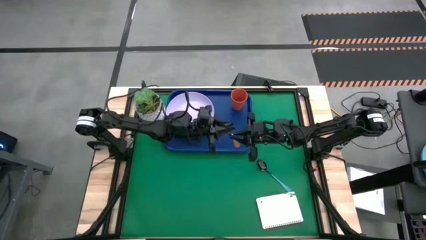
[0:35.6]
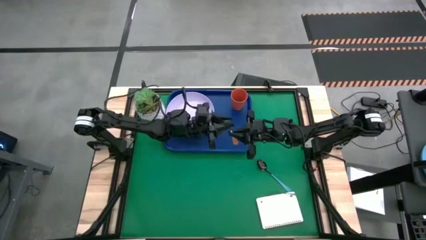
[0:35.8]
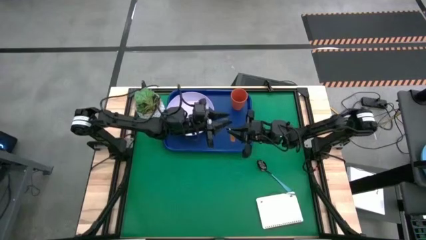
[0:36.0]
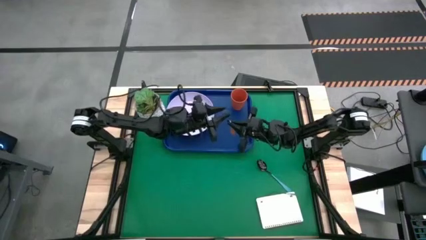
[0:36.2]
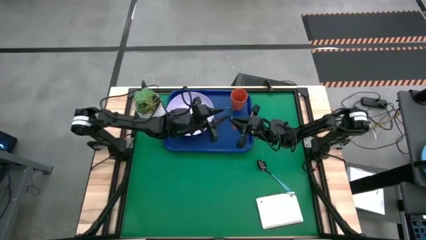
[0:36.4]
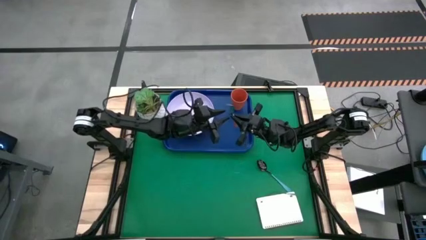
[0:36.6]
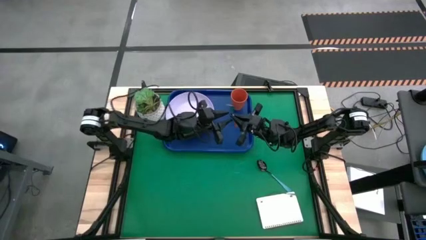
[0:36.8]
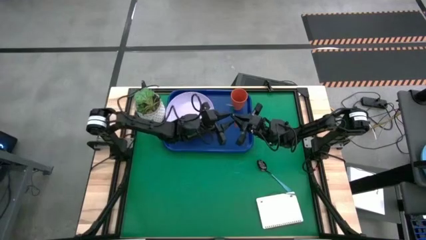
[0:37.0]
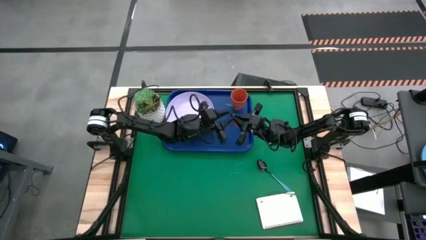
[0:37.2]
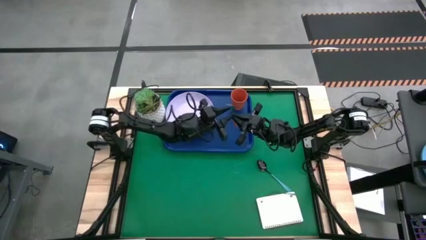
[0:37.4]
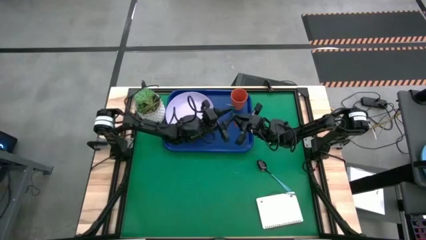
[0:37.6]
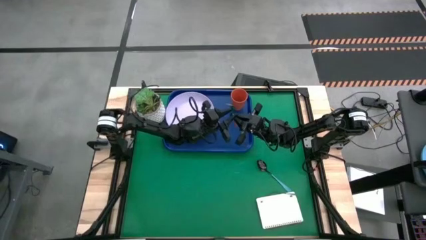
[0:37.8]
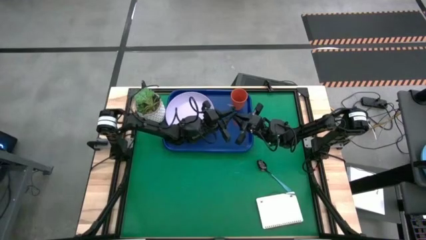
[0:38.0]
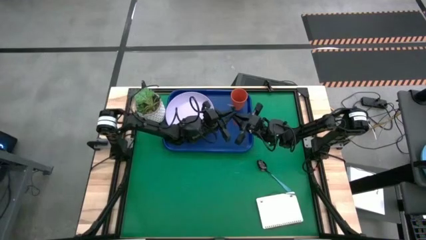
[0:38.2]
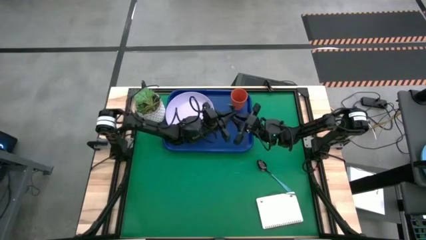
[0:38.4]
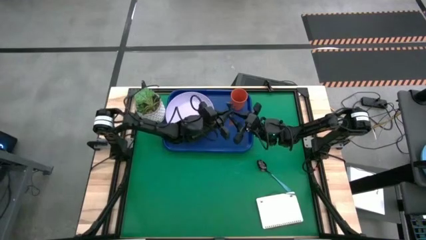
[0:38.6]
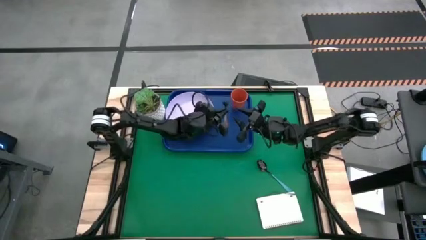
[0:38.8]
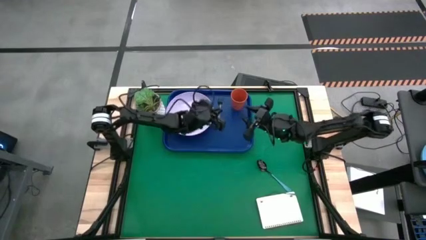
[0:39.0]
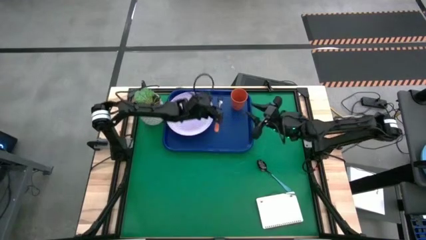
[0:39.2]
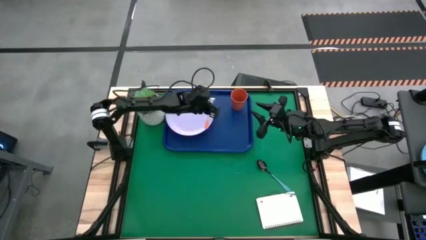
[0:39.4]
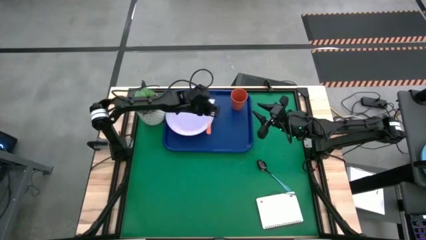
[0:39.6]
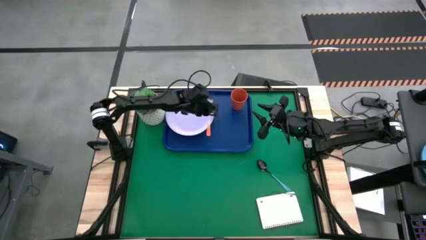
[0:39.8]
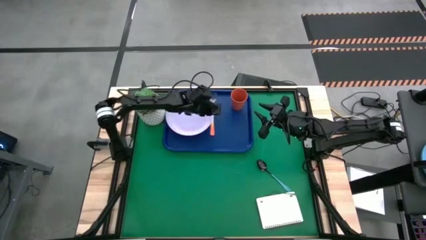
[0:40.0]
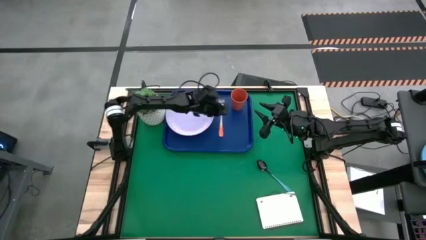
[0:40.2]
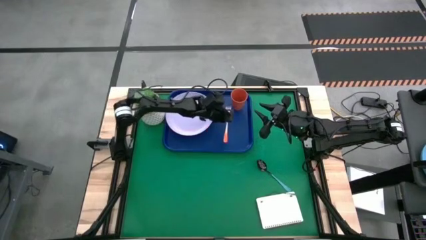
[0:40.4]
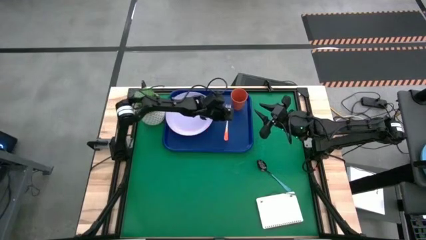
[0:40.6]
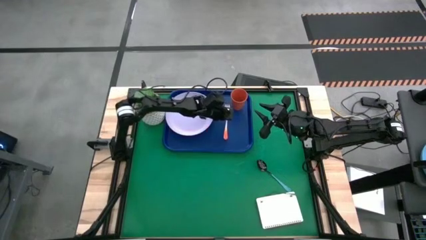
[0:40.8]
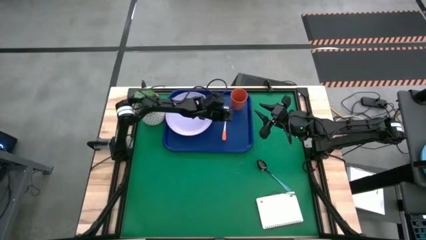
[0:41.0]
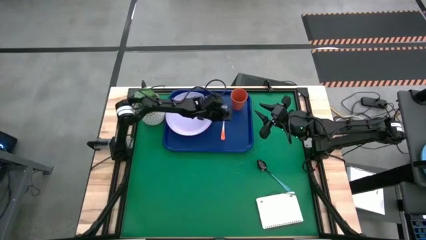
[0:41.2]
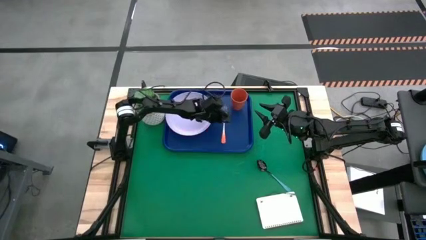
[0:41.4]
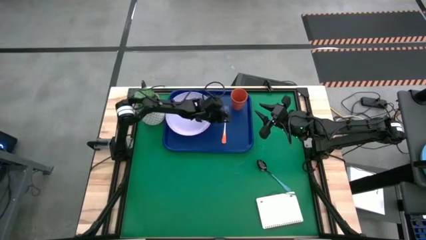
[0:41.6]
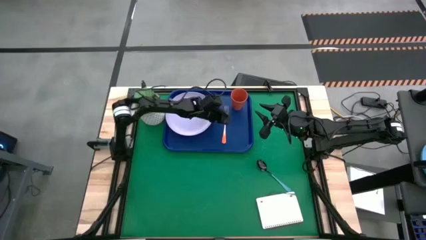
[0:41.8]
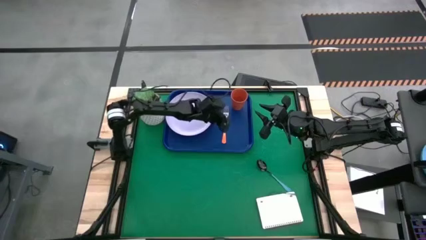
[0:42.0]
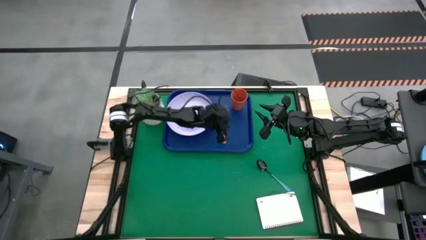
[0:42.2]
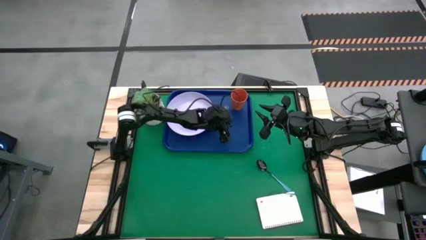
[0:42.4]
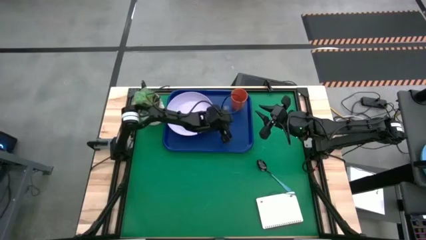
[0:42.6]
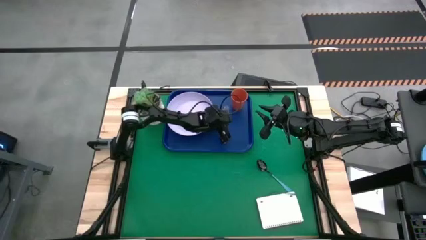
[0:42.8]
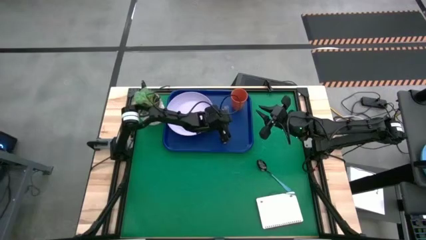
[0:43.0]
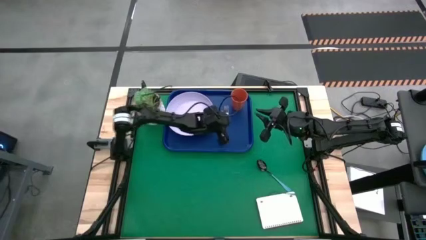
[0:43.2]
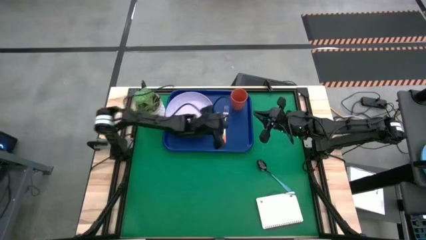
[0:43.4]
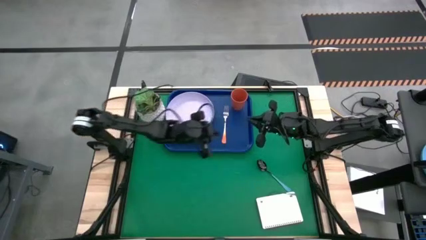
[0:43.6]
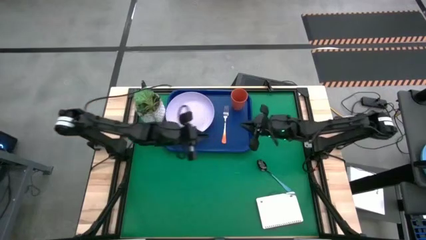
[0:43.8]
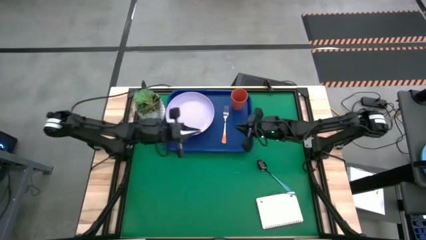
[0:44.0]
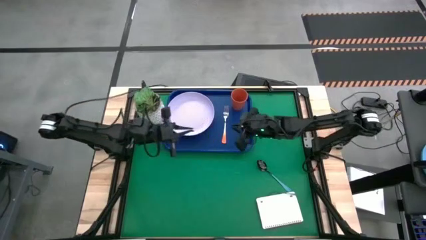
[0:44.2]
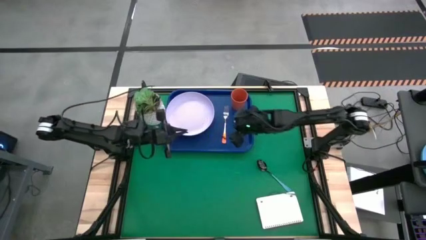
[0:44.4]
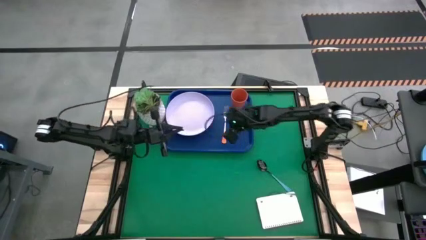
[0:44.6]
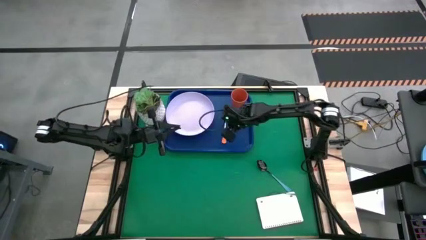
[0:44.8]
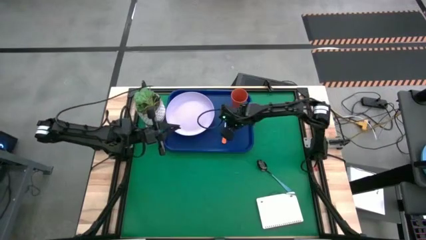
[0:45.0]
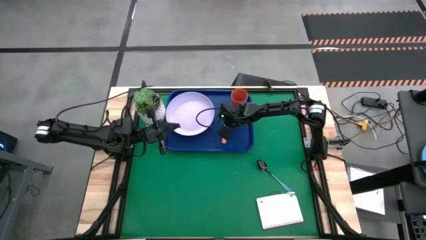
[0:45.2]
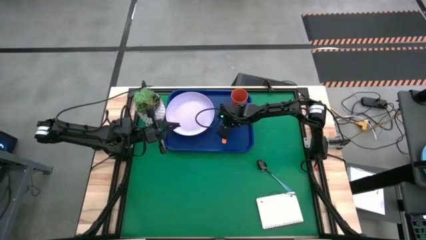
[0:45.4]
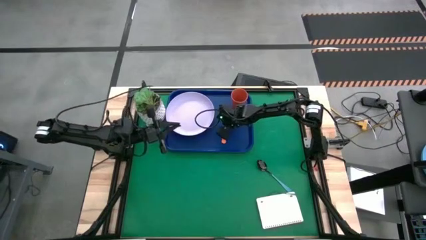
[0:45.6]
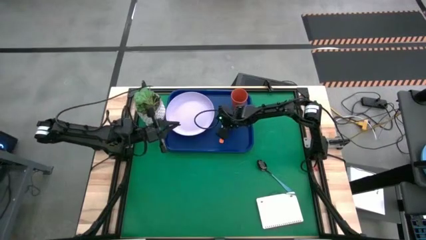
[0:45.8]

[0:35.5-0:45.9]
Task: Pick and place plate/cup/fork/spoon on tray
Put the orange fork on the blue serving tray to the right of the purple plate
